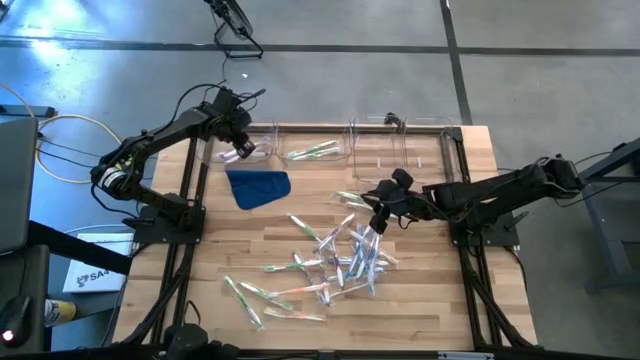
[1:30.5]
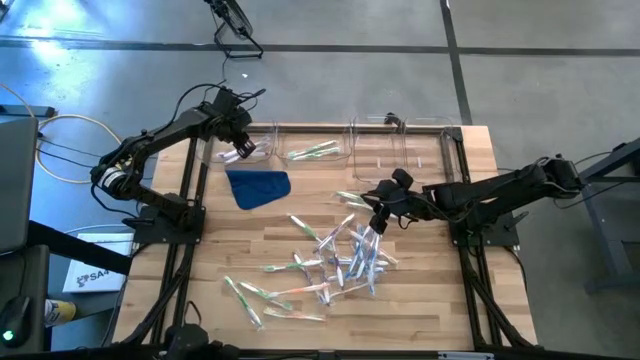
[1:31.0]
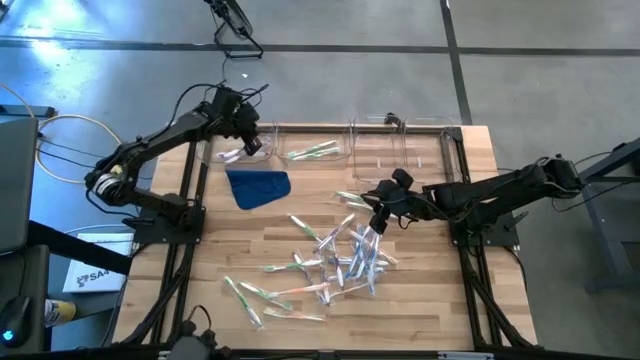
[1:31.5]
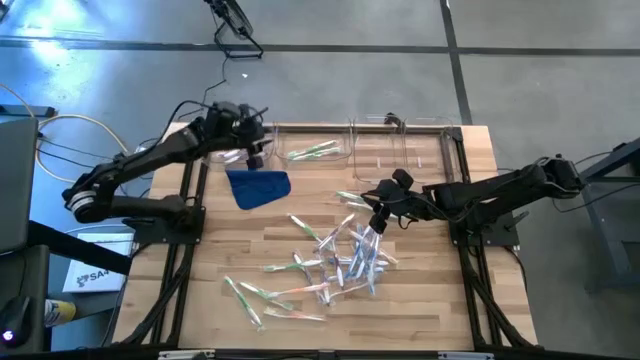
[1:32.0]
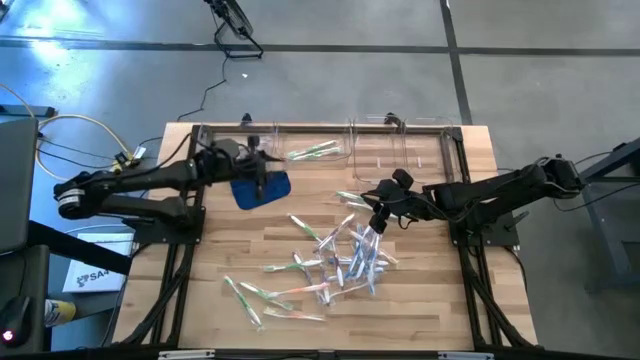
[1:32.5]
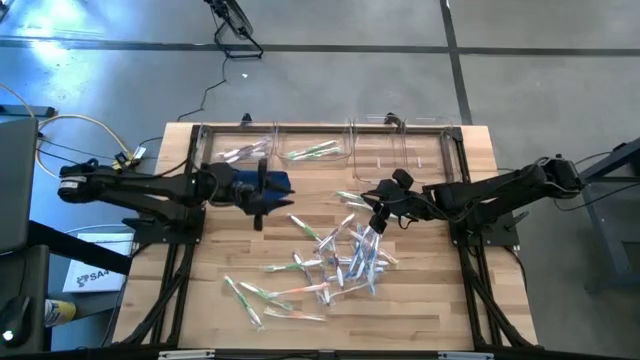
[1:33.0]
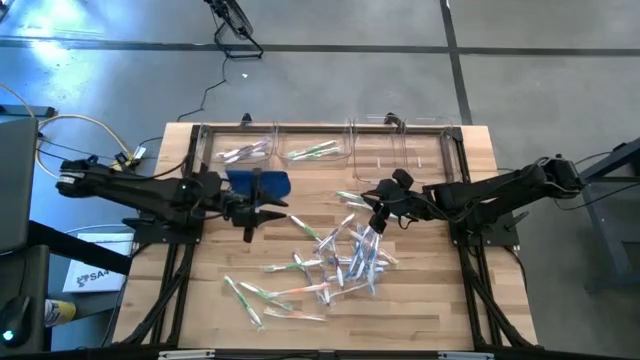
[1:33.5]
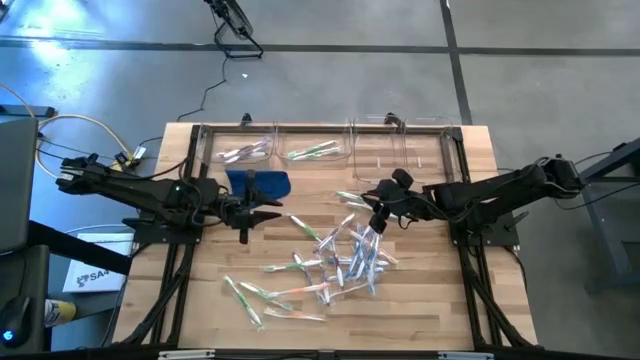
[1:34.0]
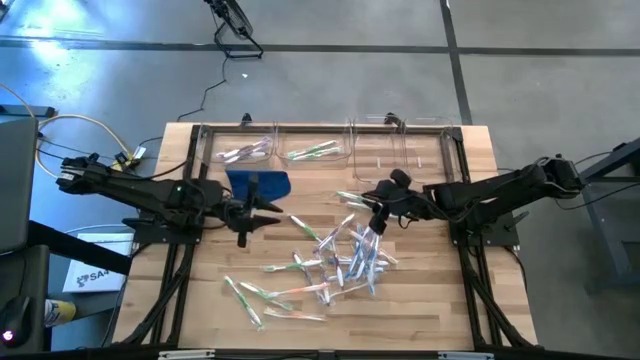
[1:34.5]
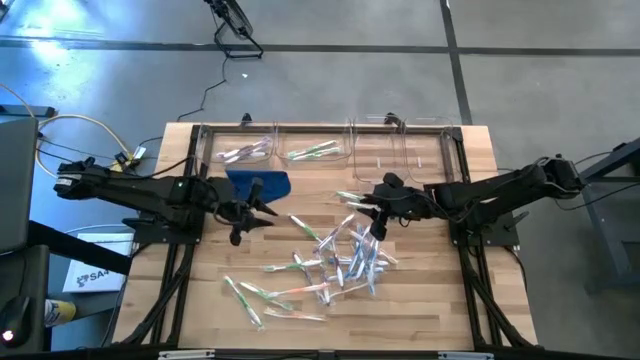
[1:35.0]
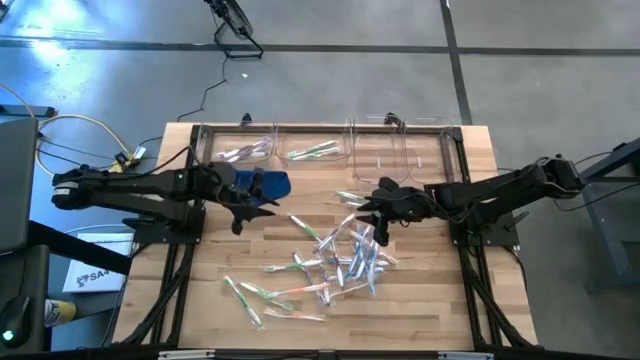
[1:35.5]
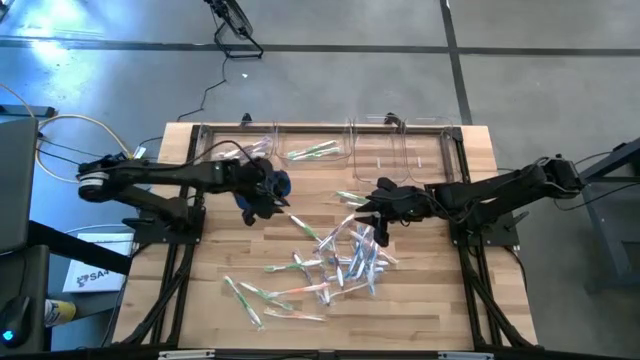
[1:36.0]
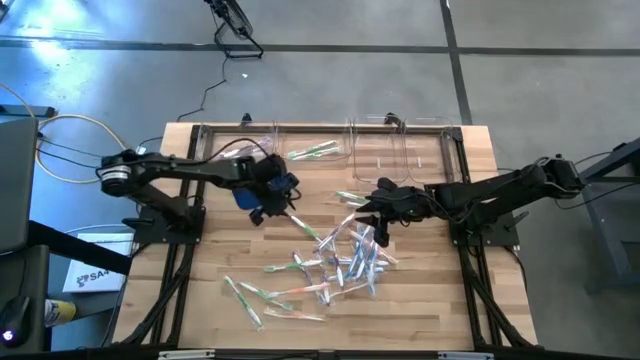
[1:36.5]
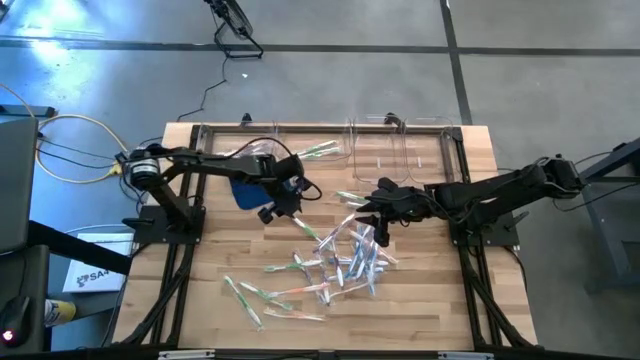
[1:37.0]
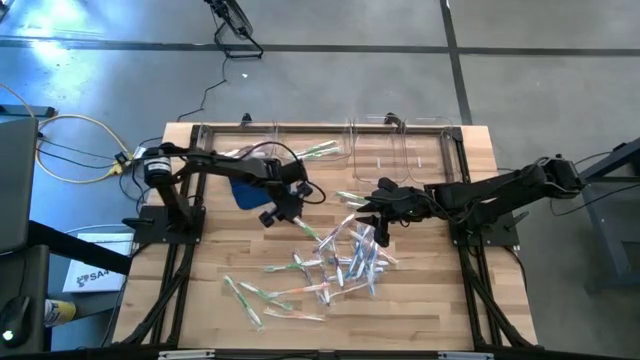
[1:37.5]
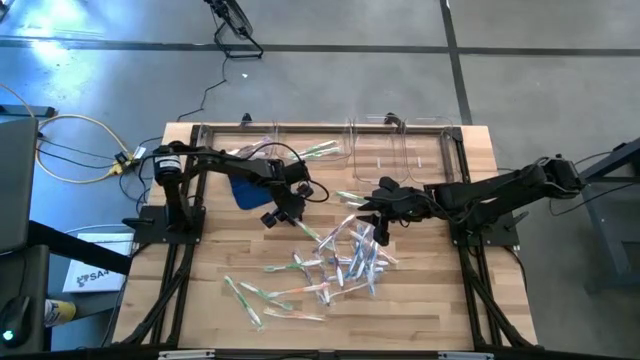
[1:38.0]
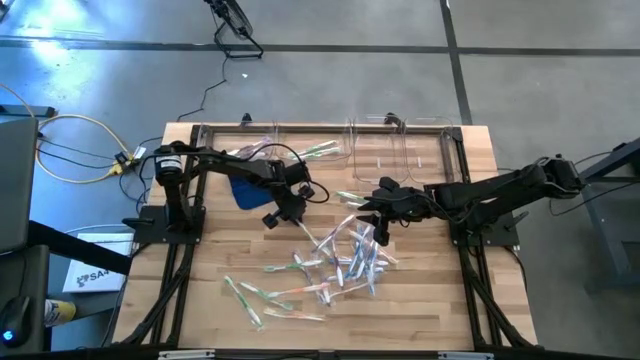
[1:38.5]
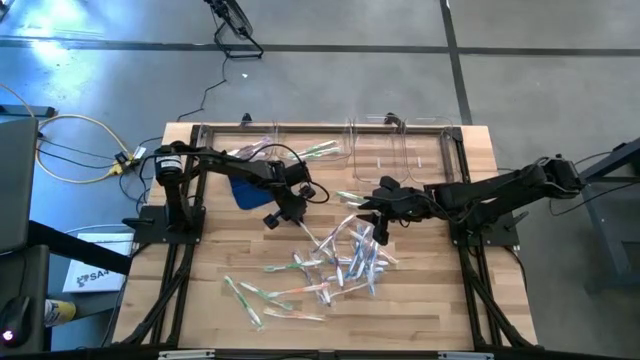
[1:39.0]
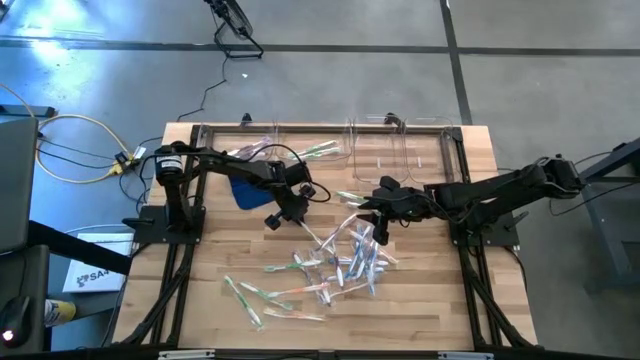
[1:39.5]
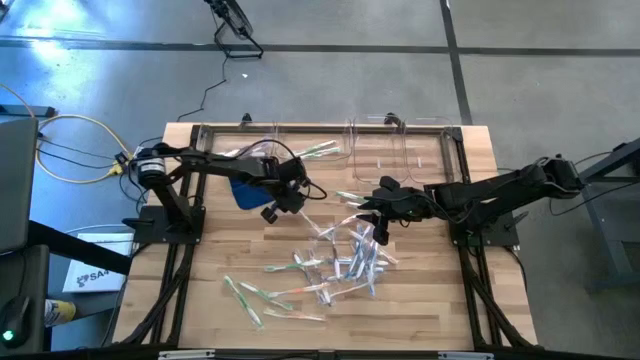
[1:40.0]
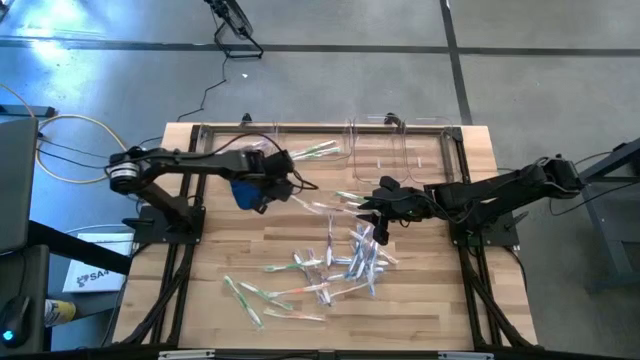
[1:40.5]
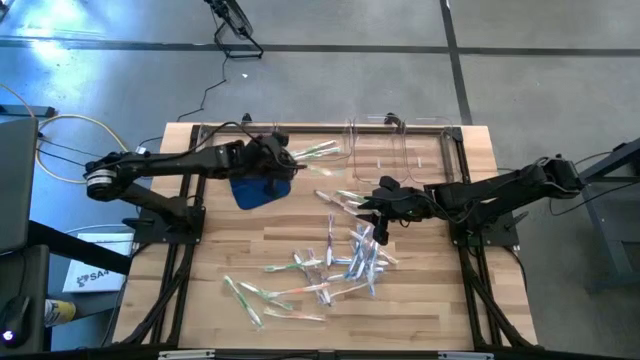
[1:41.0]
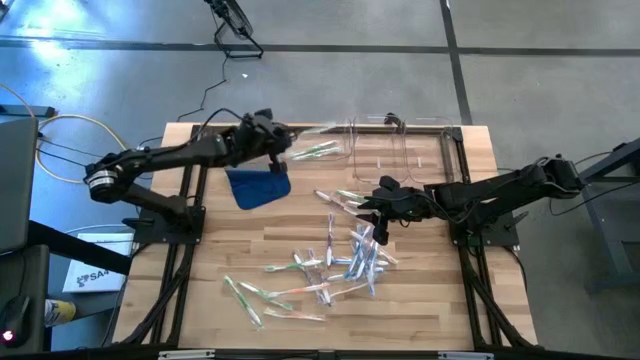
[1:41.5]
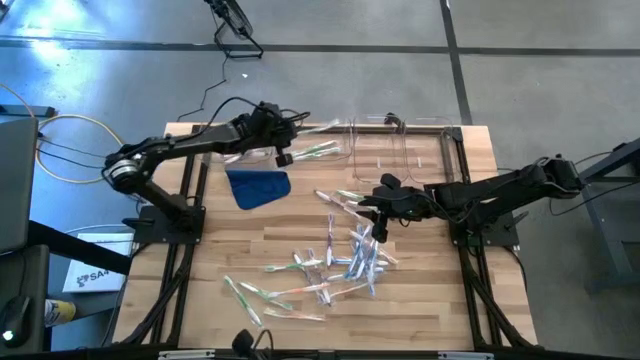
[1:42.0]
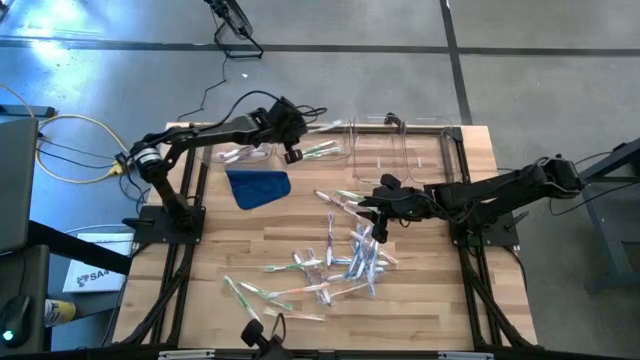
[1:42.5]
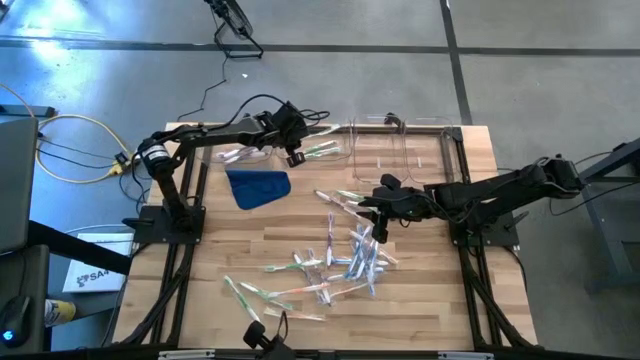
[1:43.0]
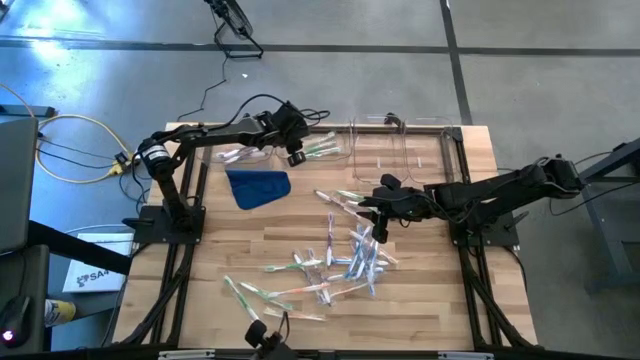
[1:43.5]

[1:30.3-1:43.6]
Task: Pick & Place Toothbrushes
Put the green toothbrush into the middle left transparent bin

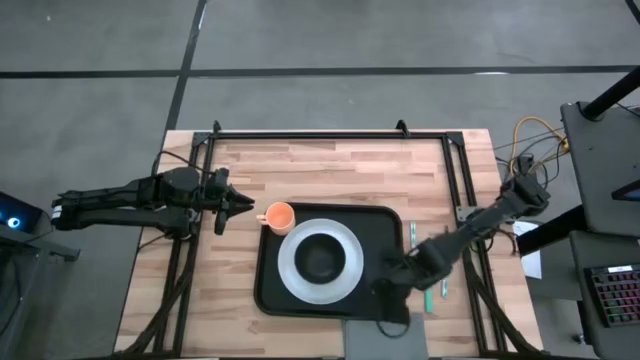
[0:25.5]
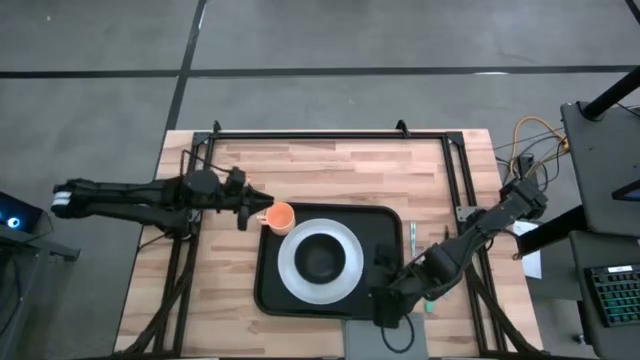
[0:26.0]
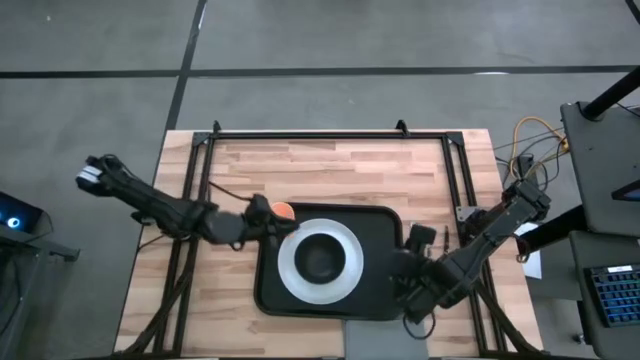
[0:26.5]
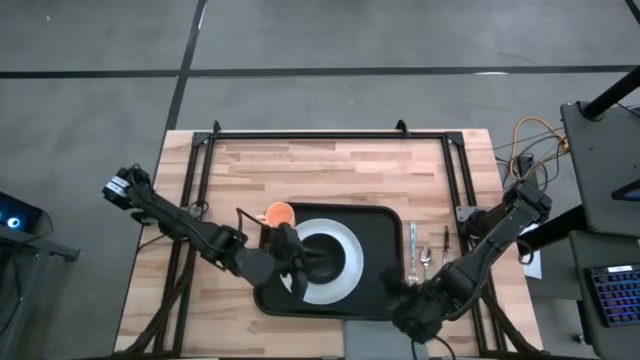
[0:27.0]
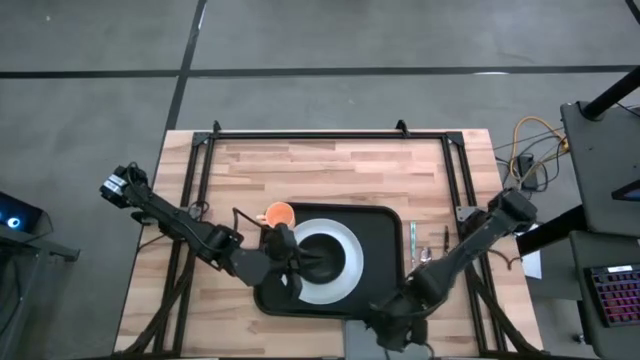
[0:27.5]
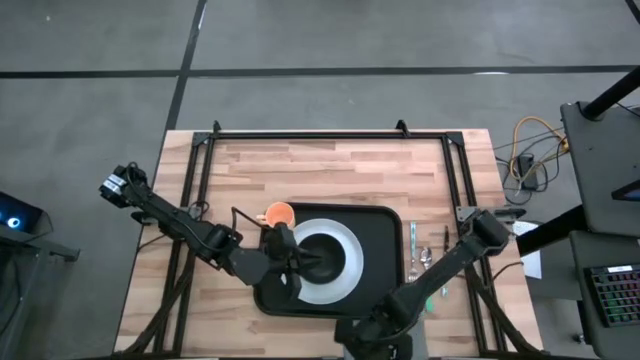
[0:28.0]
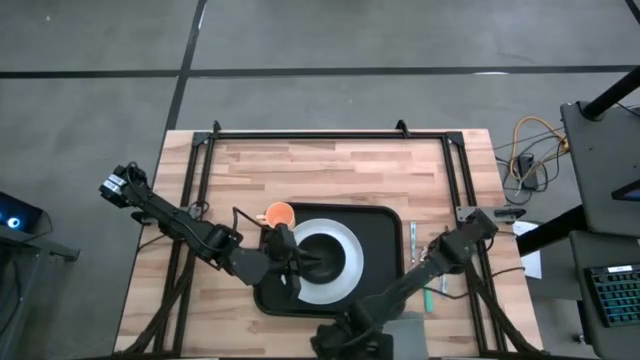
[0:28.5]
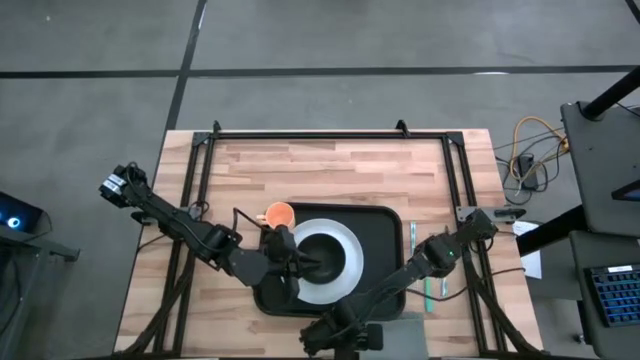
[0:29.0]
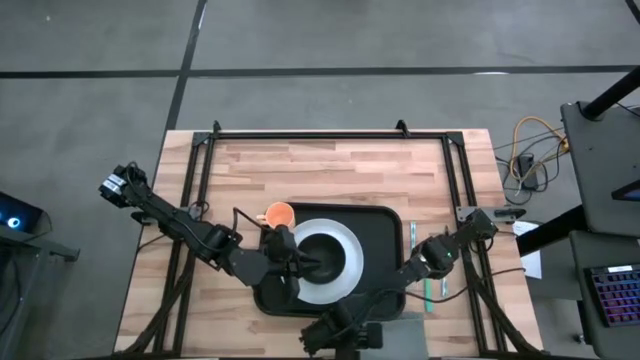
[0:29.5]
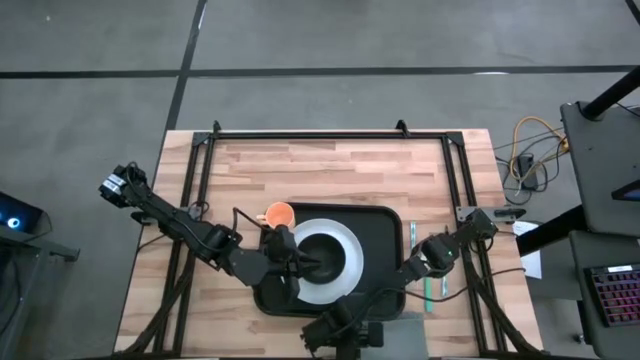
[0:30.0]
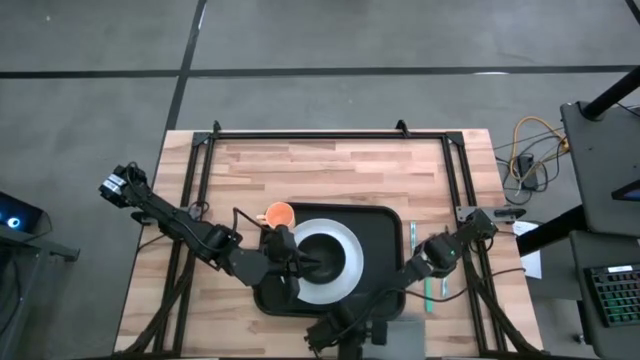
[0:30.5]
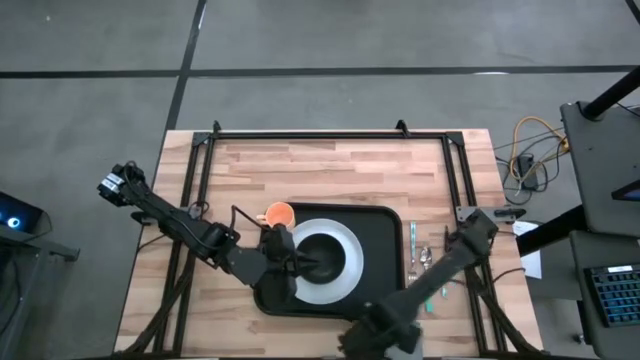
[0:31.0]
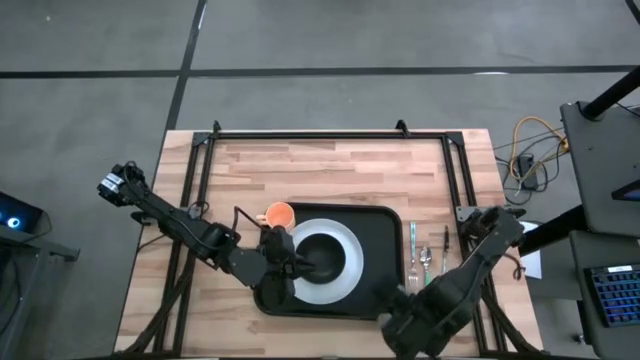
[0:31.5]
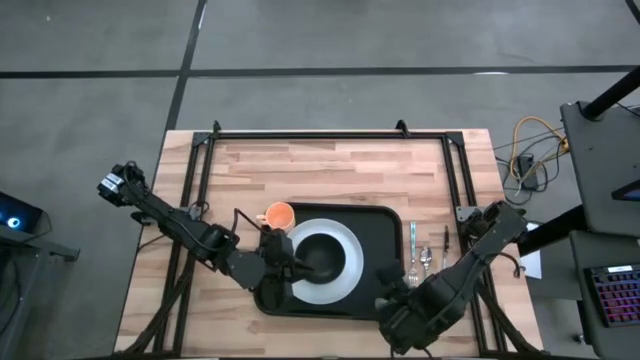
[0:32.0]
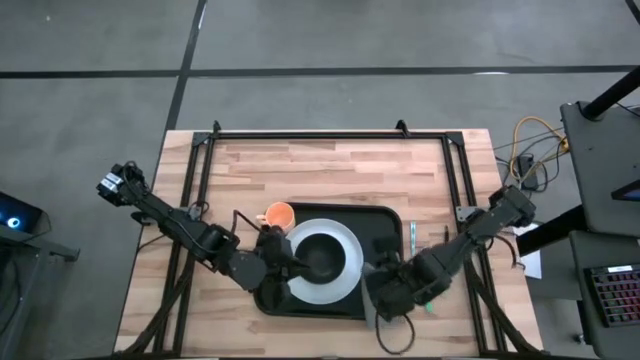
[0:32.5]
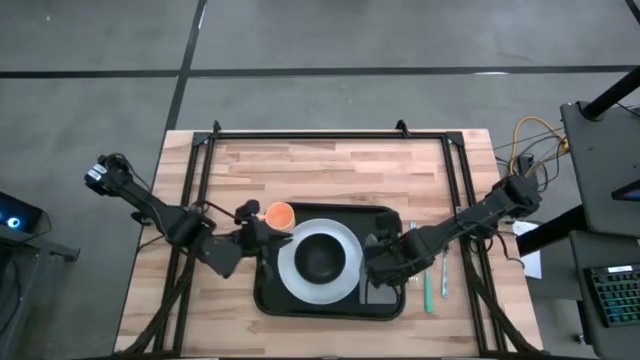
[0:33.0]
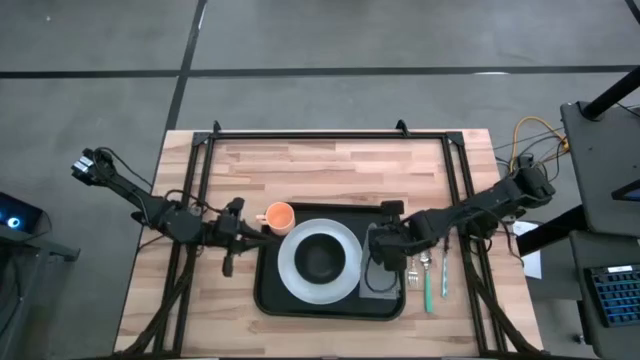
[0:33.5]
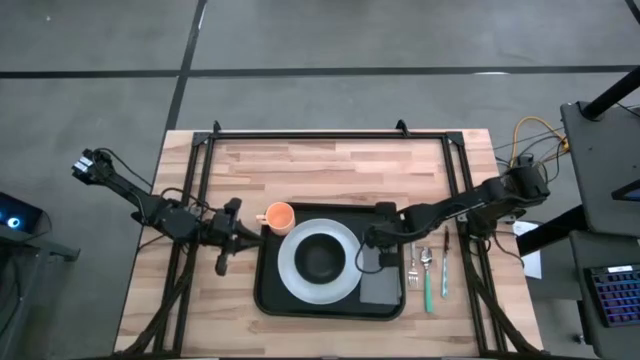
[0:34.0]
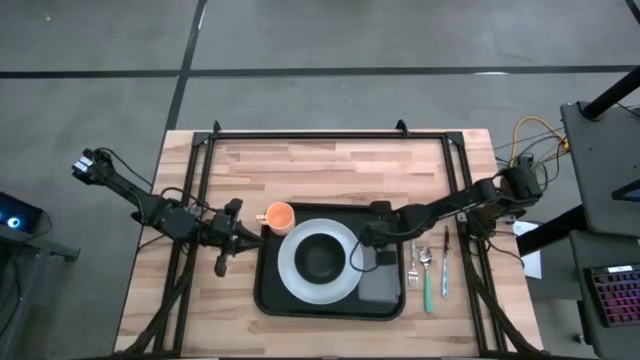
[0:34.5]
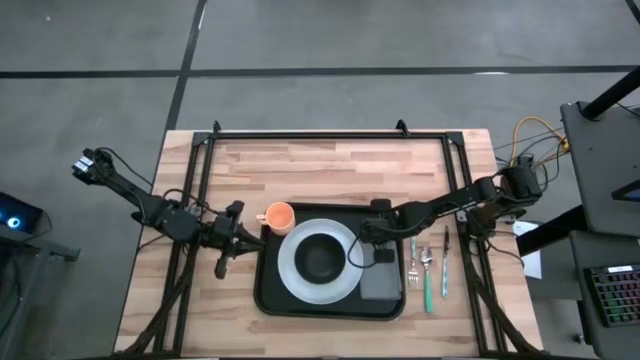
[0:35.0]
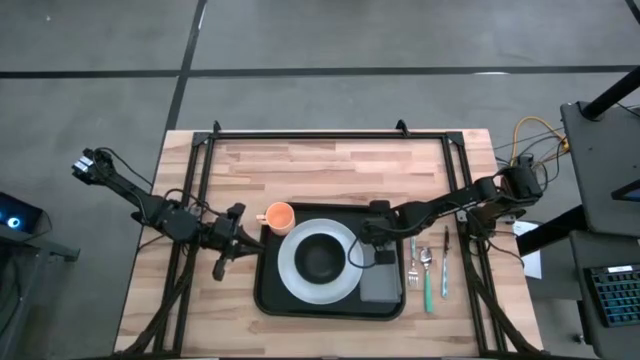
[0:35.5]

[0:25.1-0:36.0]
Task: Set up tray
Put the gray napkin on the black tray
